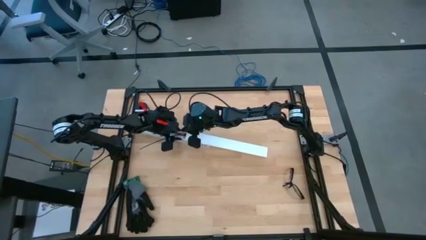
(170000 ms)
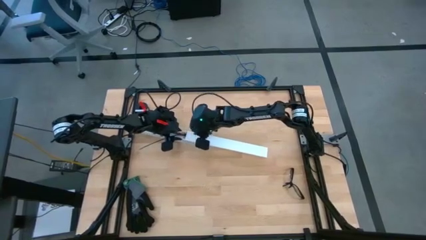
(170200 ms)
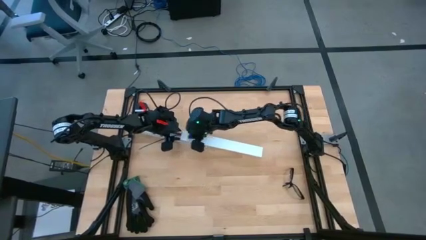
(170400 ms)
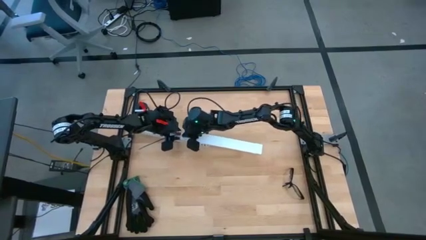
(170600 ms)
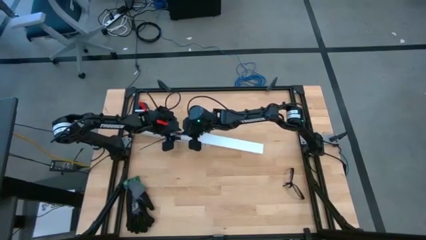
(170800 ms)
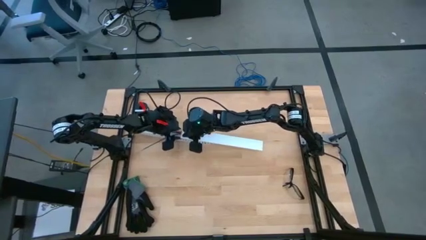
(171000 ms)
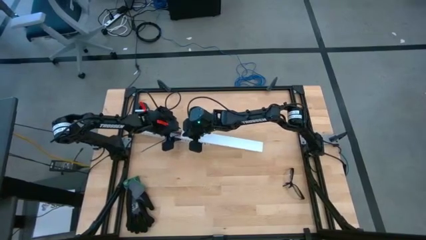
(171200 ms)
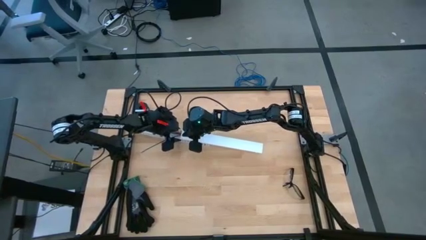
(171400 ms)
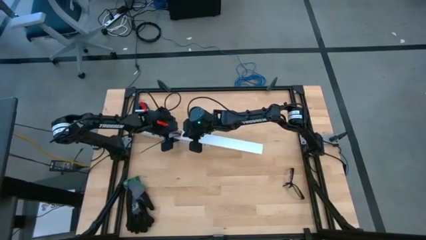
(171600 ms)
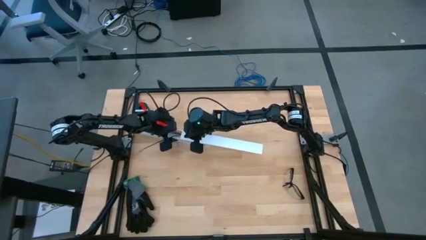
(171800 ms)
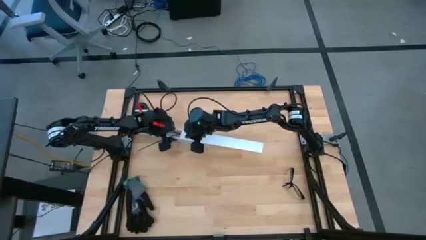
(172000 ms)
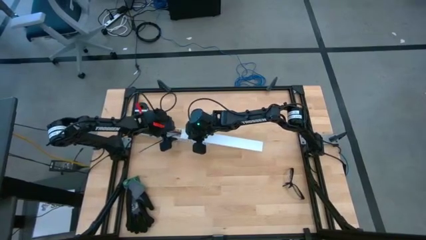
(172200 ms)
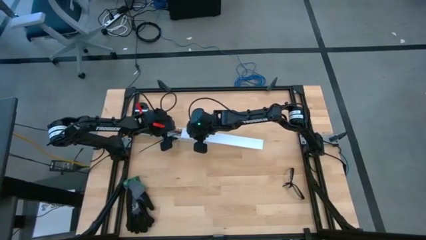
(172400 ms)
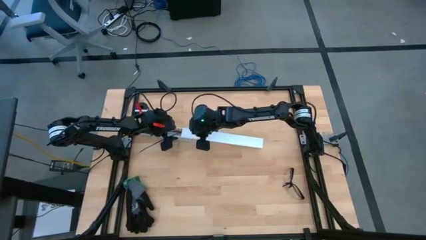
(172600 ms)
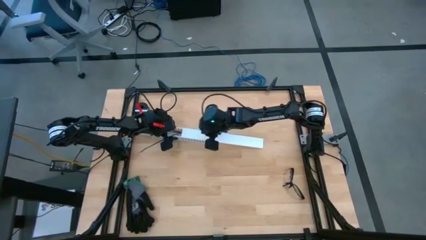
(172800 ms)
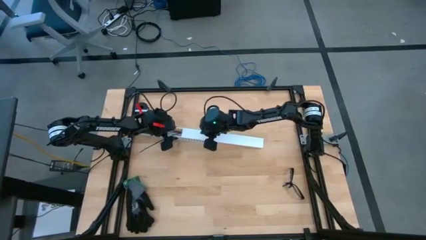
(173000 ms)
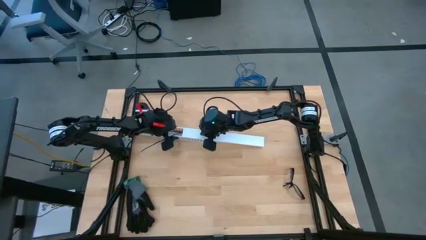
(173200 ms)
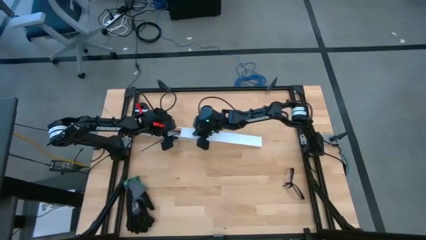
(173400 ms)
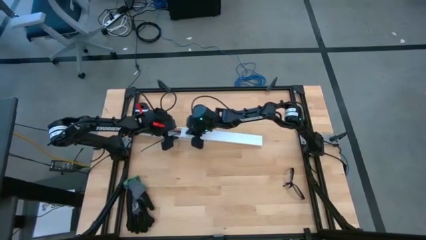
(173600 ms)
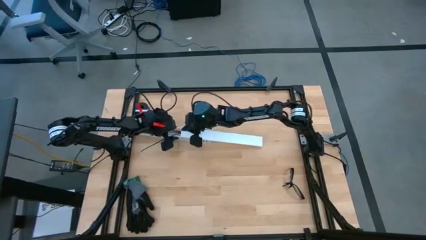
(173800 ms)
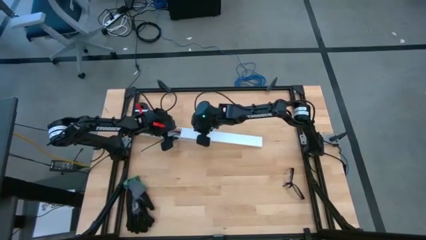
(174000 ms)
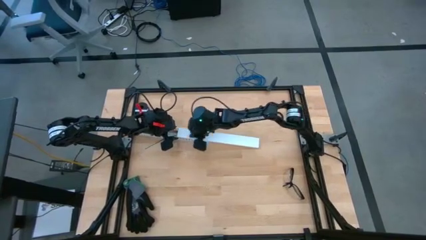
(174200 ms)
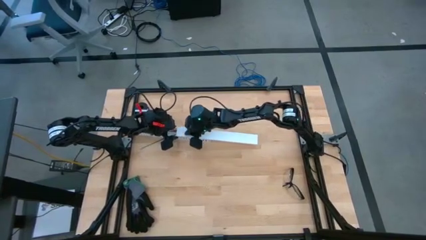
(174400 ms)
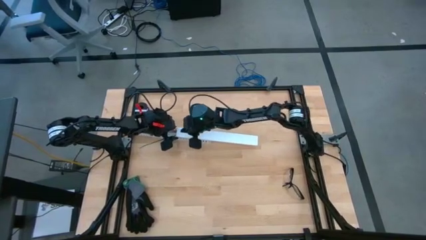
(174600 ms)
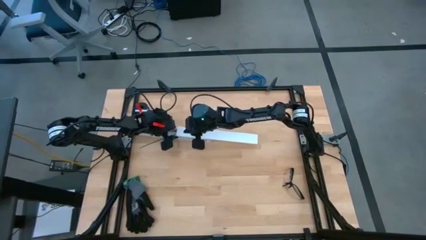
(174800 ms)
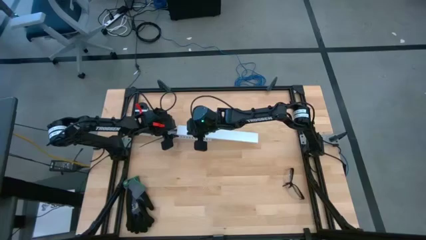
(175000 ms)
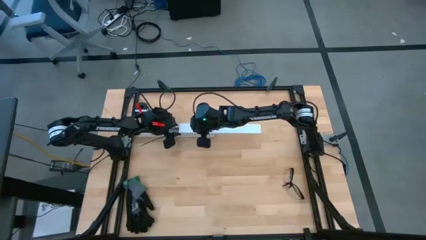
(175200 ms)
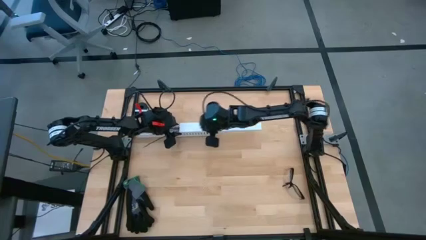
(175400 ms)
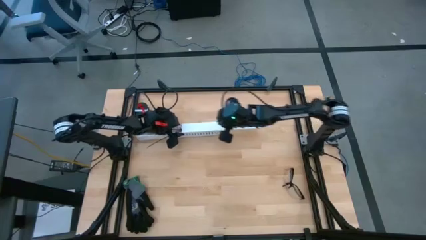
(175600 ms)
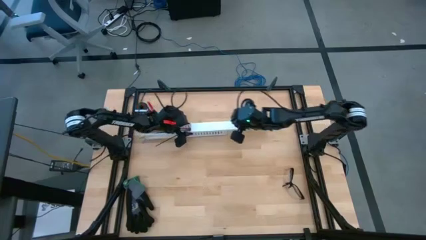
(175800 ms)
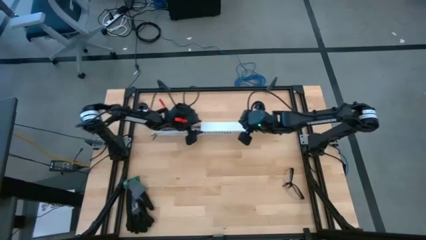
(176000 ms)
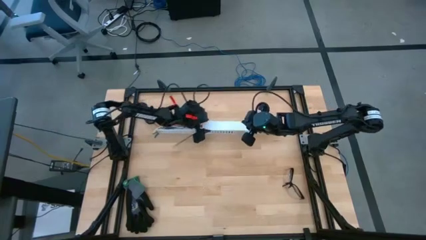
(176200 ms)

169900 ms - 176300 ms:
Task: Ziptie cables
Close the white cable duct

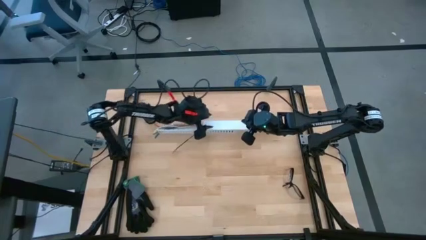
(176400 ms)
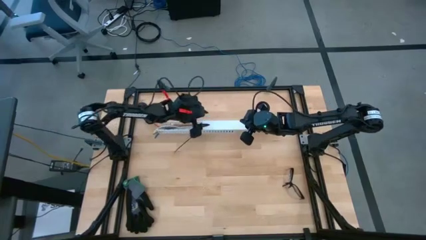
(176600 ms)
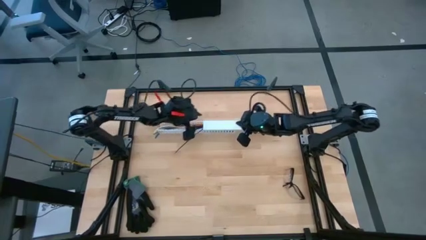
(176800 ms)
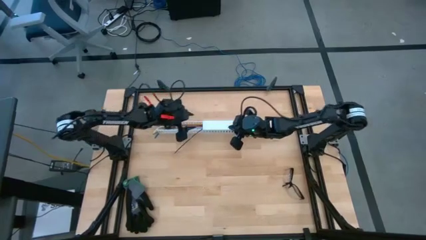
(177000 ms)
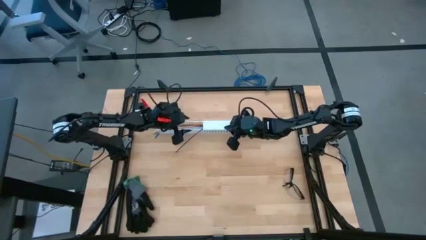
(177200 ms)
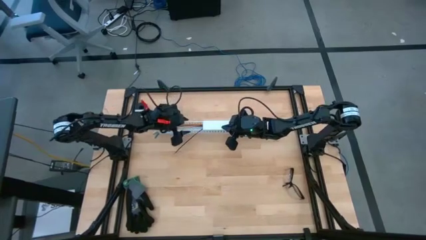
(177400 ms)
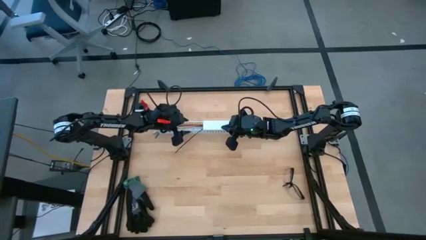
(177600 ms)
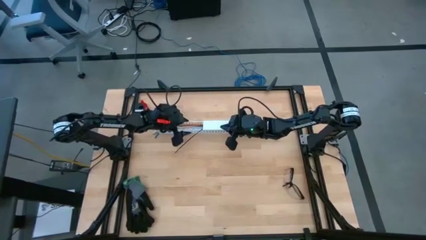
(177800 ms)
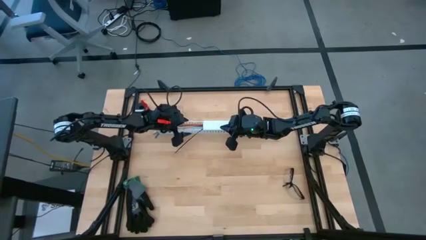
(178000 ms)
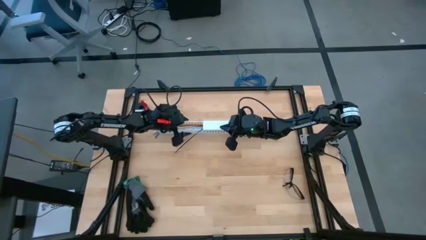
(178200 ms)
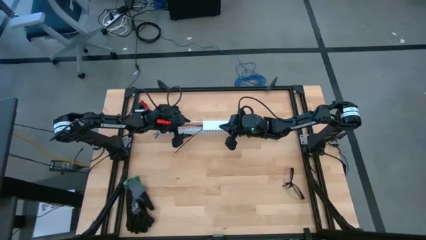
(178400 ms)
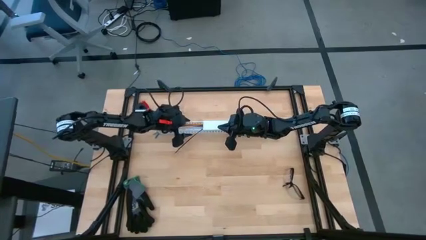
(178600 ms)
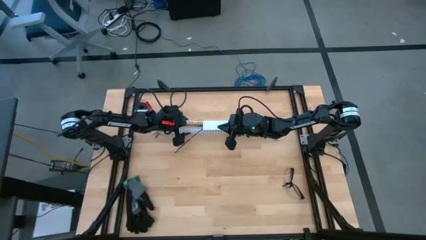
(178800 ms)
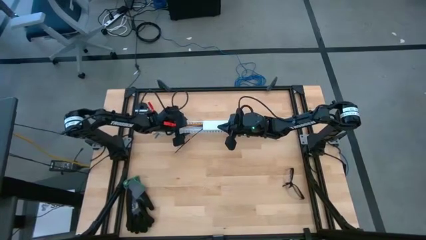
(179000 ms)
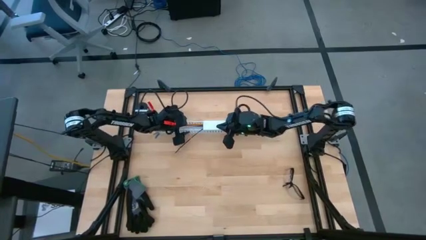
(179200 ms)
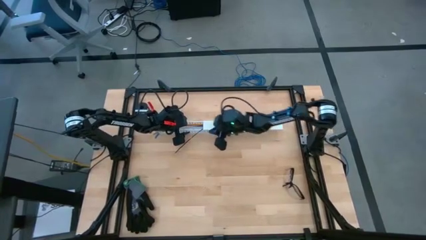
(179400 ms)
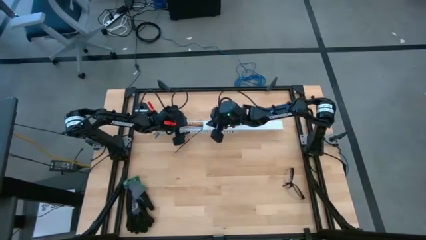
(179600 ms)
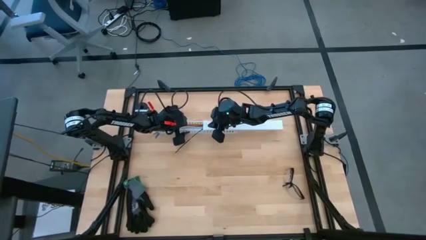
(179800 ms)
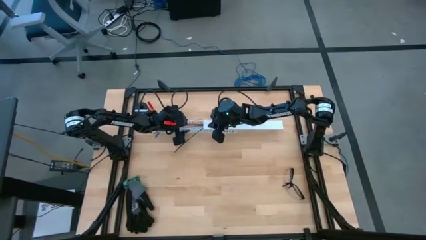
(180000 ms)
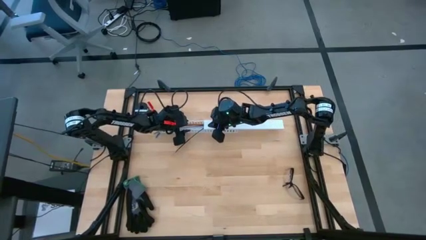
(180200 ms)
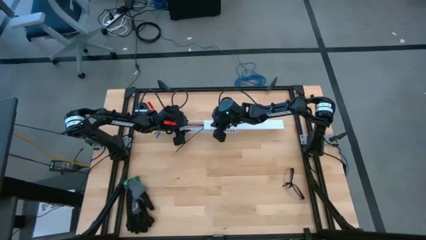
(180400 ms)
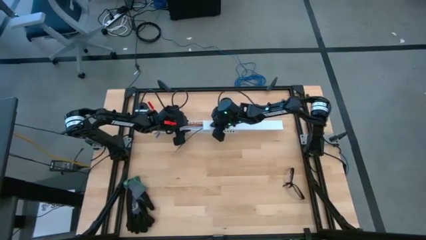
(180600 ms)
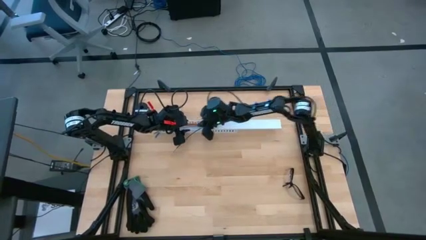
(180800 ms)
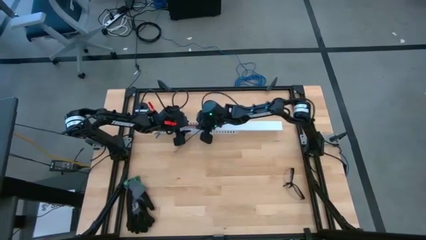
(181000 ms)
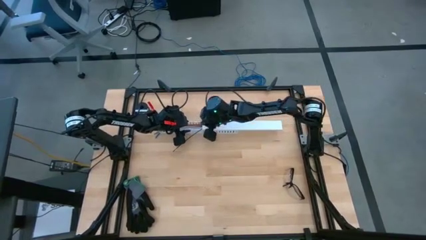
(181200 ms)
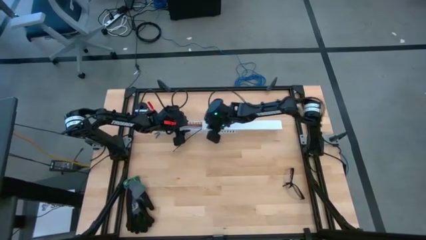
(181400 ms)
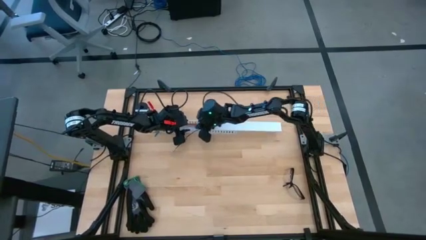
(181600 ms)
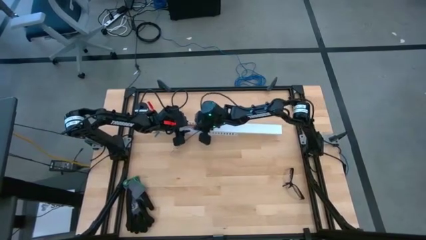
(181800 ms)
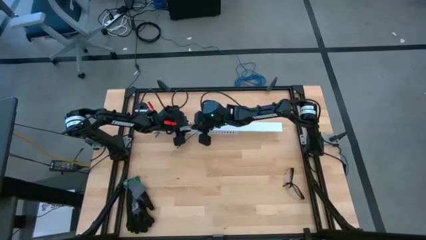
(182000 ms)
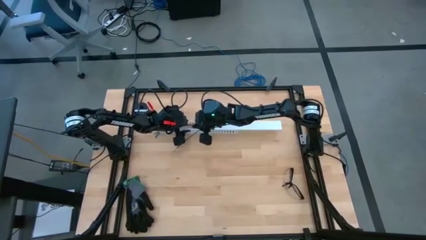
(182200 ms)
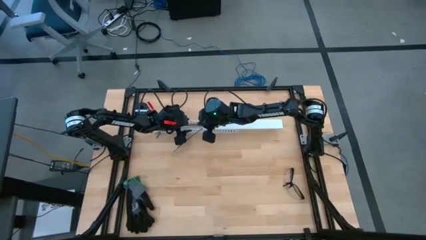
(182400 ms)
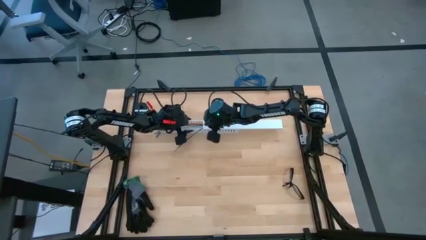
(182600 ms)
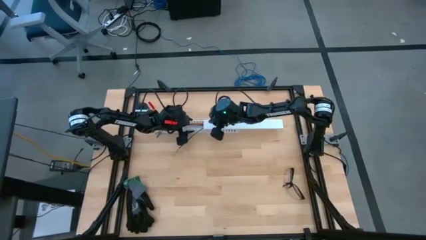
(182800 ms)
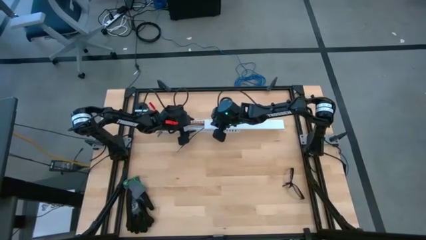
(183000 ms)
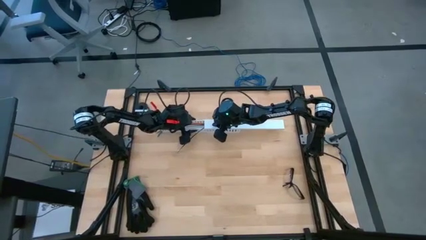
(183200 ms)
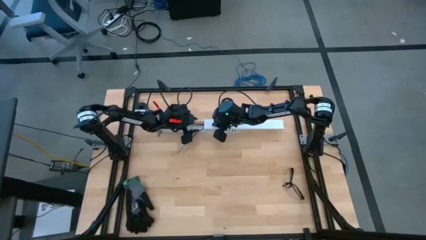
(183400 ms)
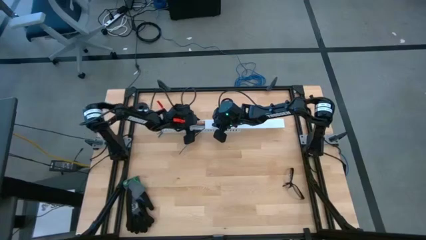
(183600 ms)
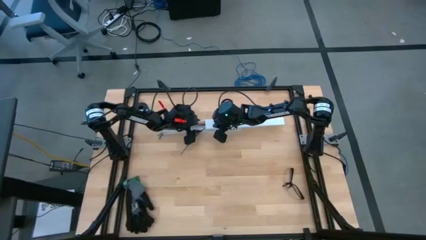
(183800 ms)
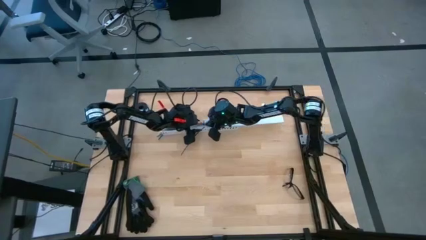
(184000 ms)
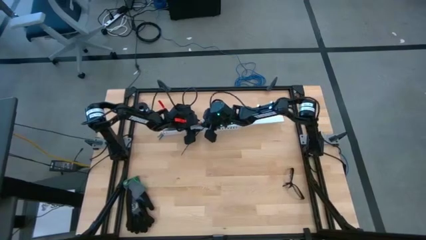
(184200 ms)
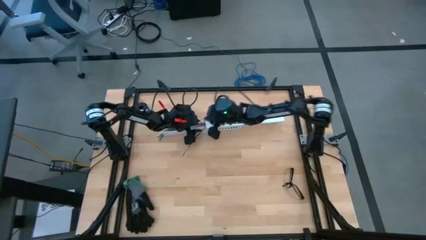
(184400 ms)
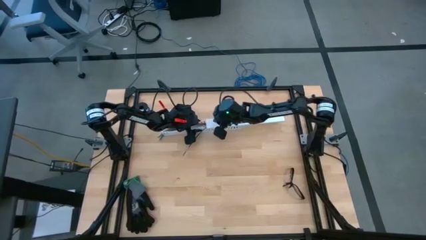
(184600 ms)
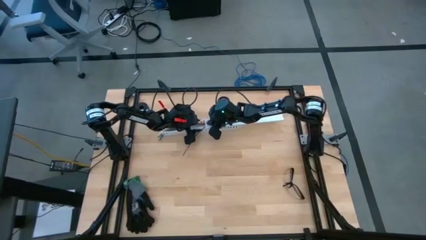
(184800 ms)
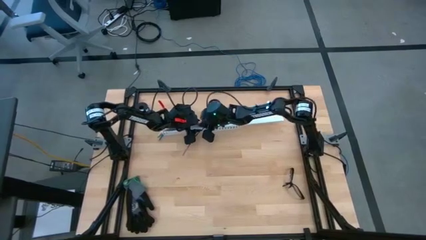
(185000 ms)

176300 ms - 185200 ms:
Close the white cable duct

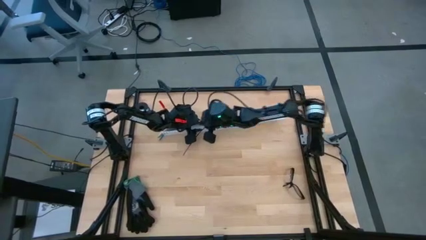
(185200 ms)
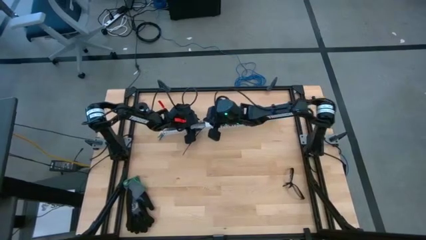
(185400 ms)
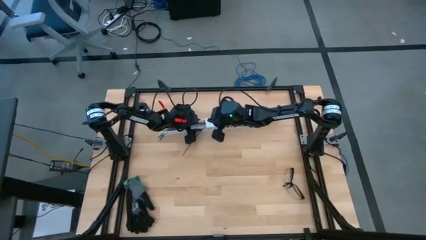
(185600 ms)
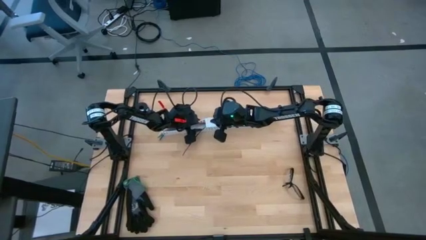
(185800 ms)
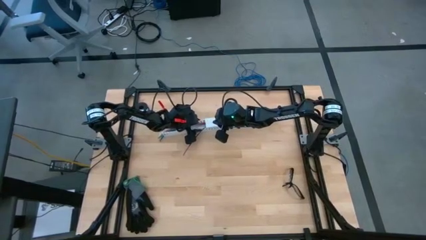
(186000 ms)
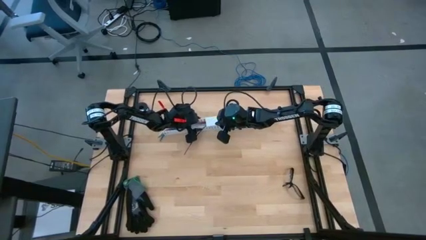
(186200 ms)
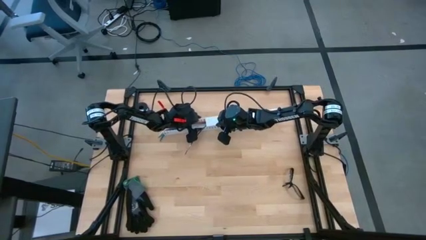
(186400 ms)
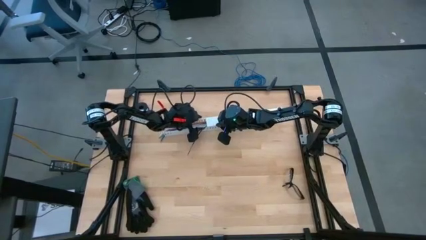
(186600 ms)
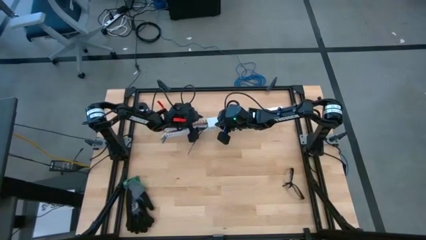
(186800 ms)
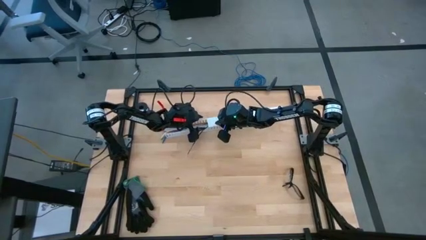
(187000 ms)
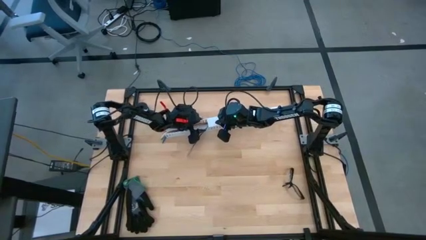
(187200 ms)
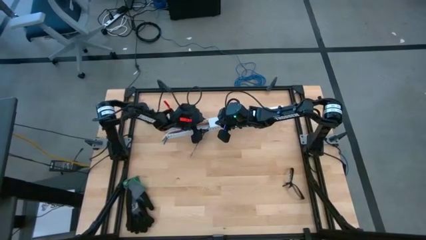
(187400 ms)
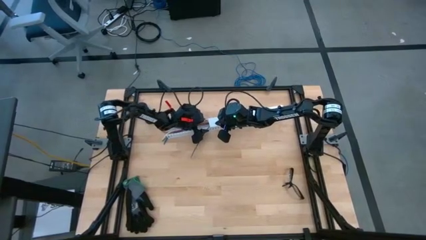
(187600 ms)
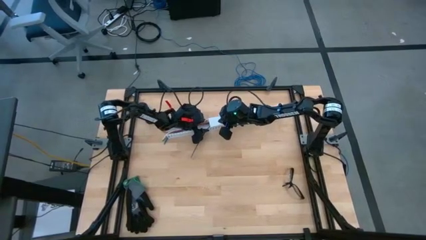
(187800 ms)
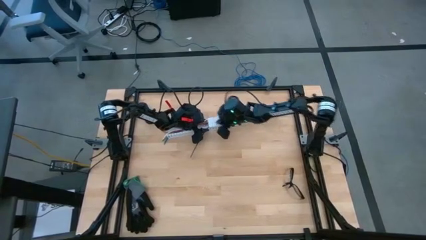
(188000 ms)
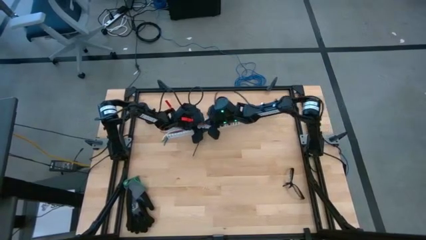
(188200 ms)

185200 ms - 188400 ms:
Close the white cable duct
